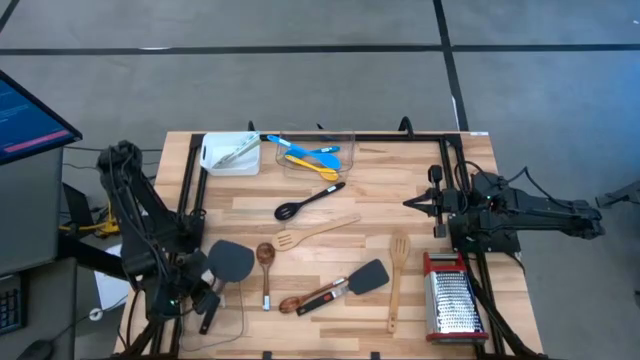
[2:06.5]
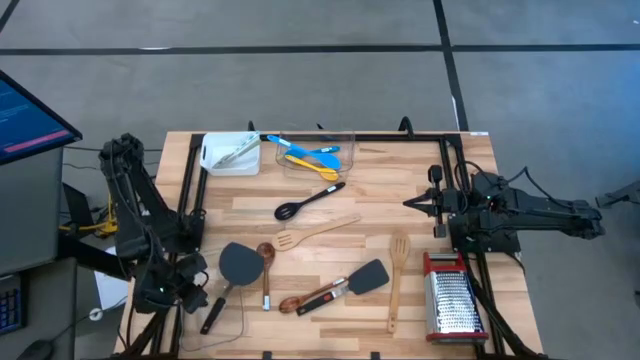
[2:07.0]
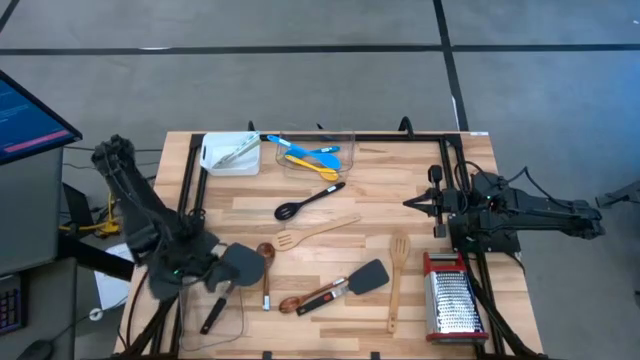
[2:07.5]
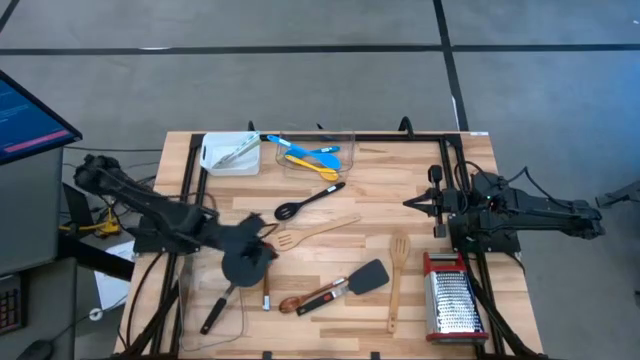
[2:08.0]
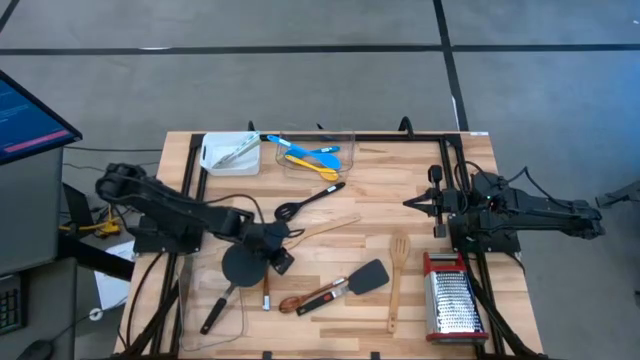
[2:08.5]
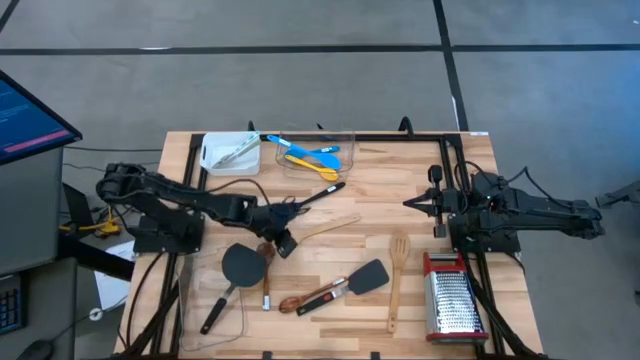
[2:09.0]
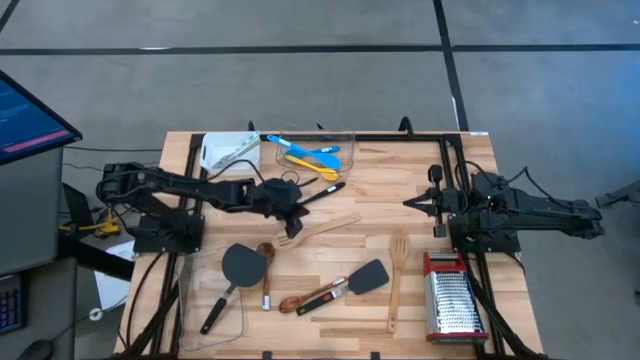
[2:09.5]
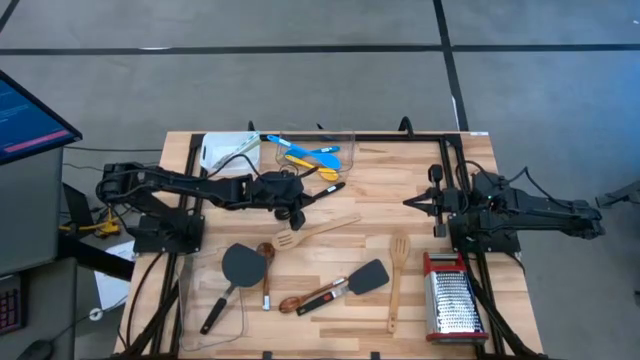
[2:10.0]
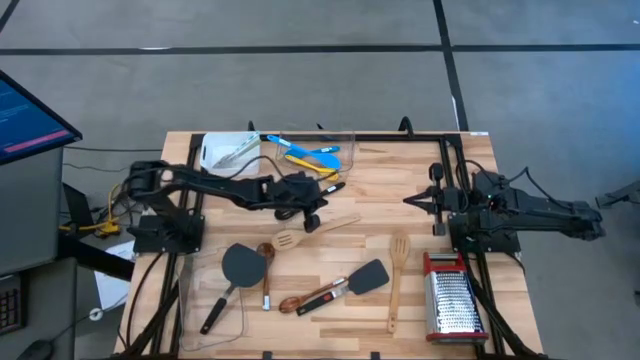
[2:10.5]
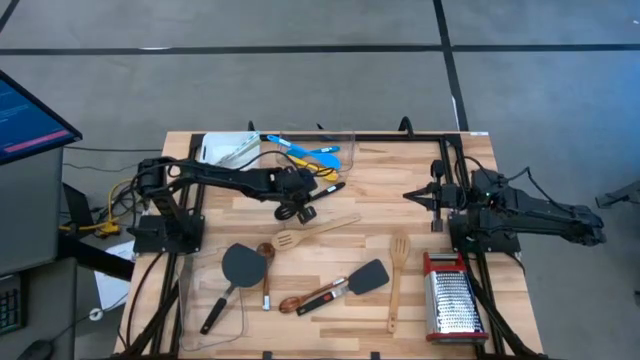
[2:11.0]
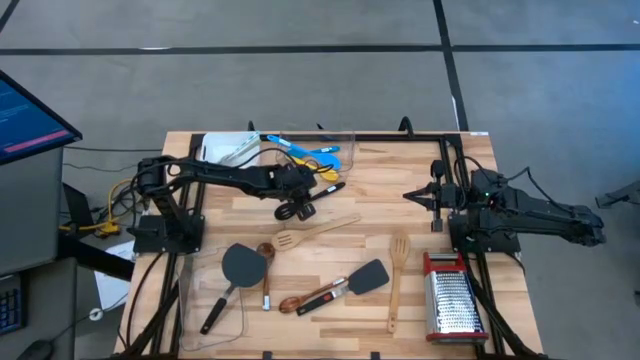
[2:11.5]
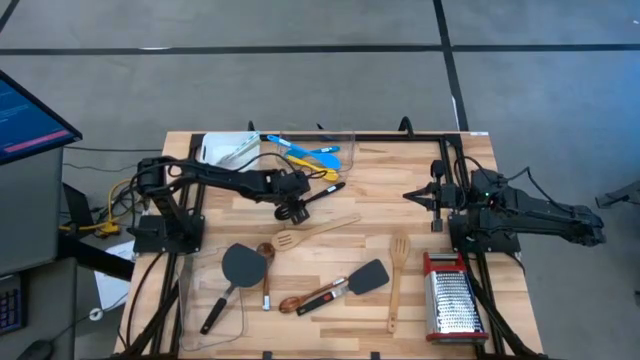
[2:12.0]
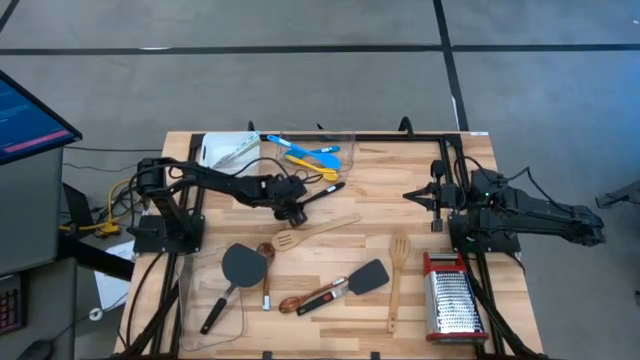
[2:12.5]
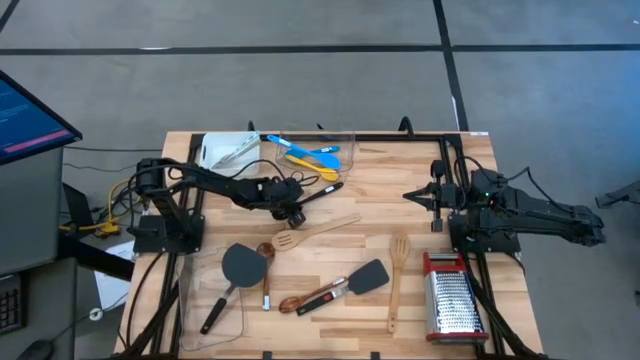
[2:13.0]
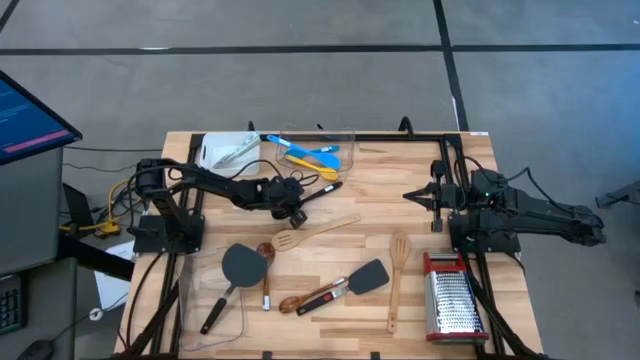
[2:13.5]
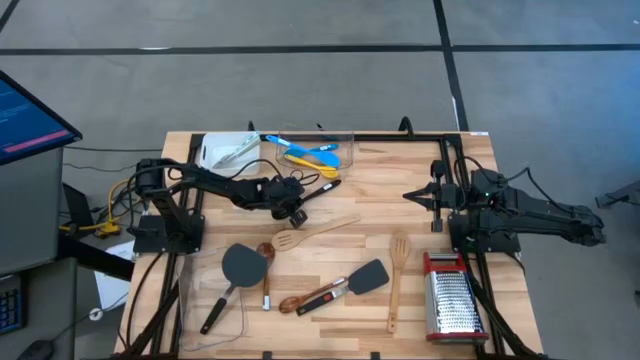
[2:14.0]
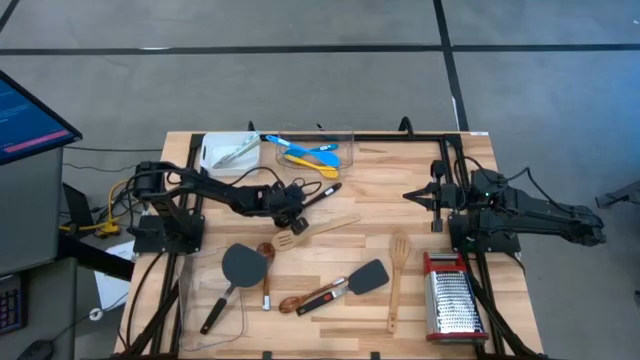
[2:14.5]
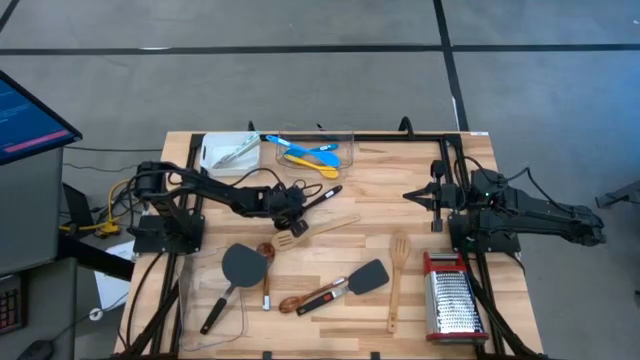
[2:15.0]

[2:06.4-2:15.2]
Task: Pick & Place Kitchen Items
Put the black serving spoon into the top transparent bin

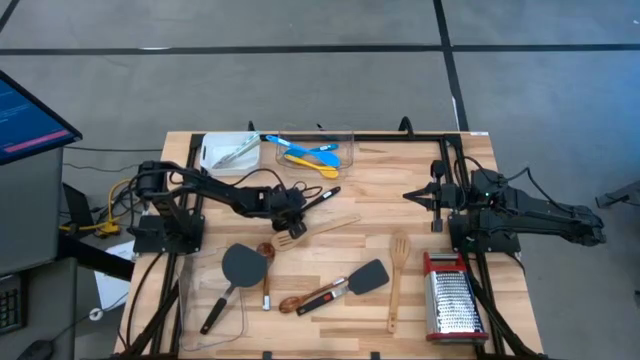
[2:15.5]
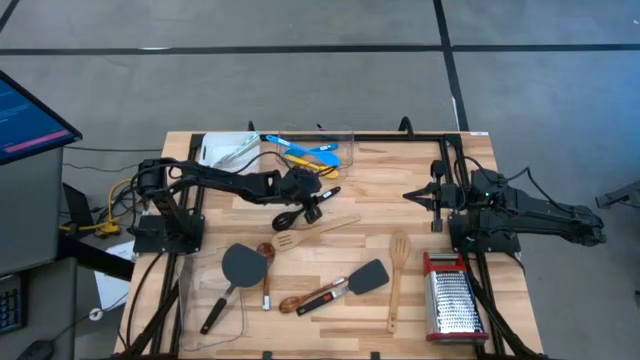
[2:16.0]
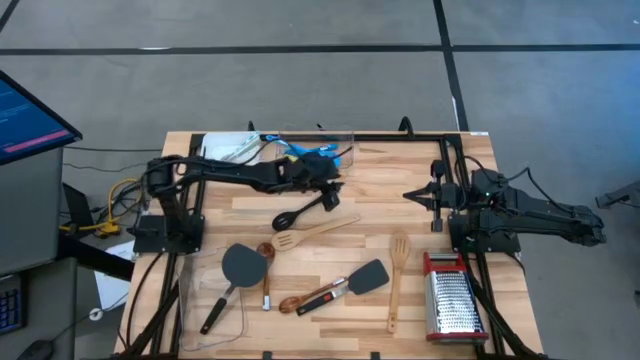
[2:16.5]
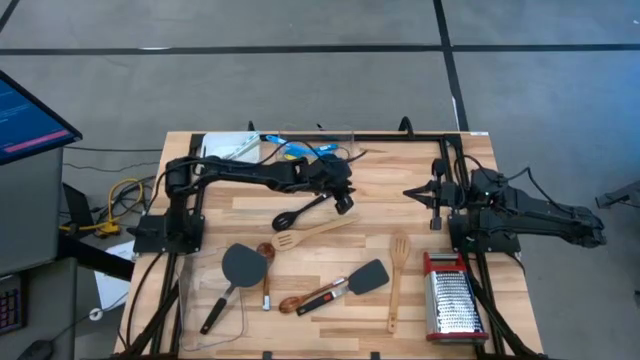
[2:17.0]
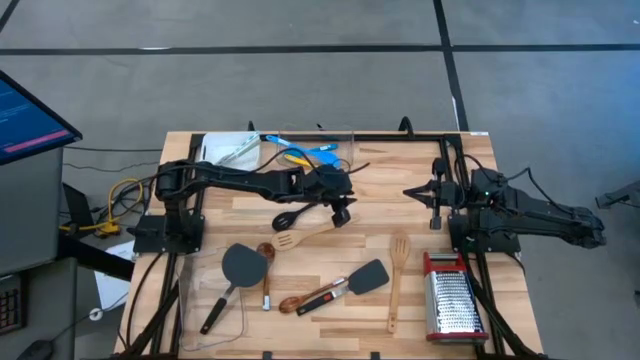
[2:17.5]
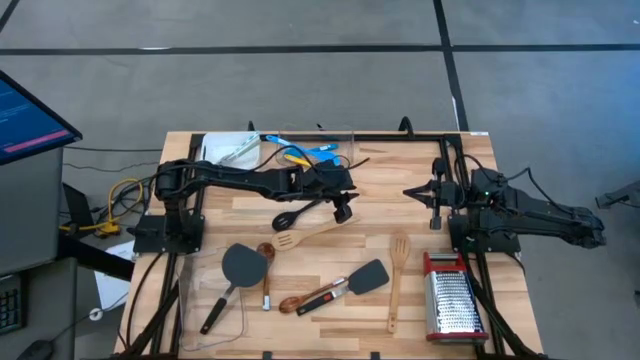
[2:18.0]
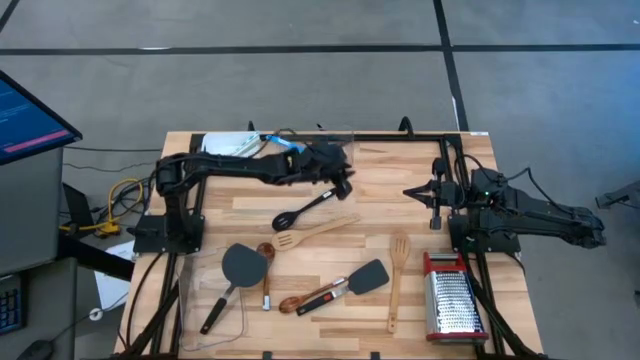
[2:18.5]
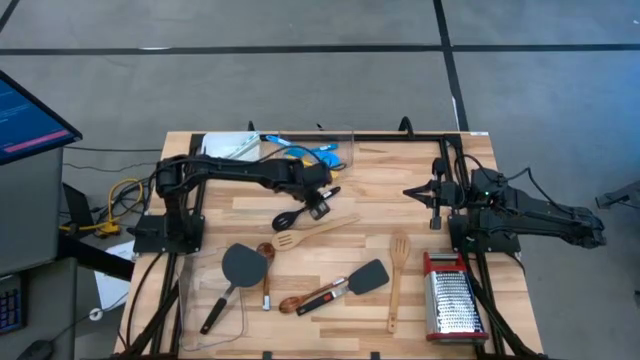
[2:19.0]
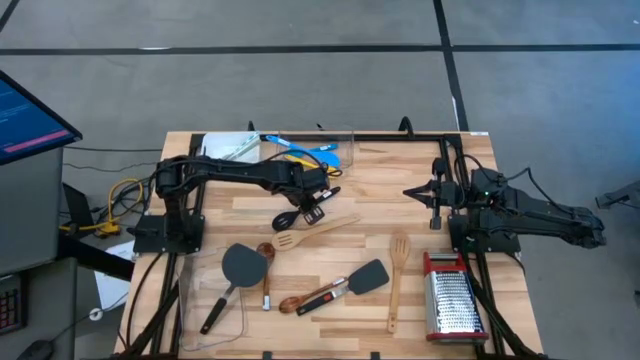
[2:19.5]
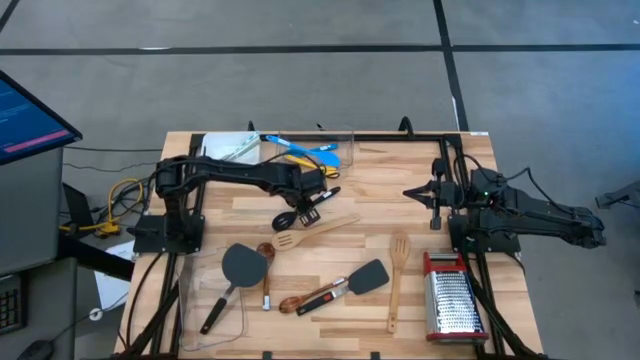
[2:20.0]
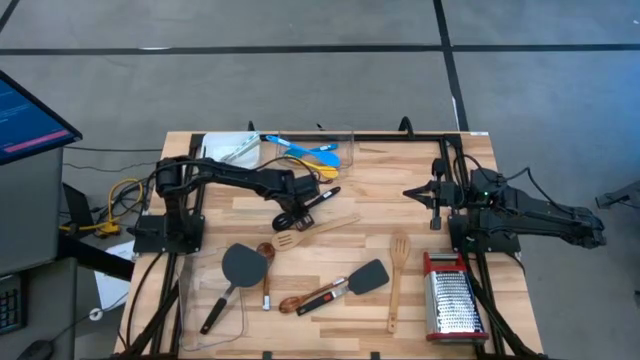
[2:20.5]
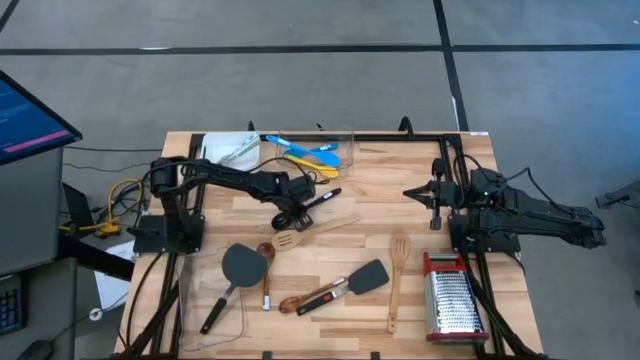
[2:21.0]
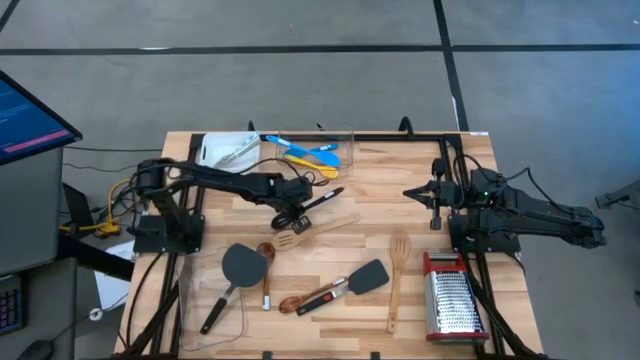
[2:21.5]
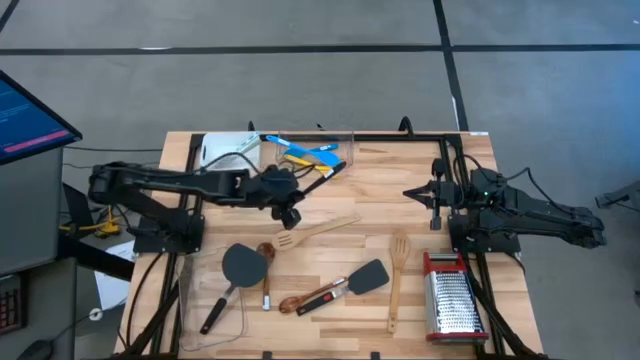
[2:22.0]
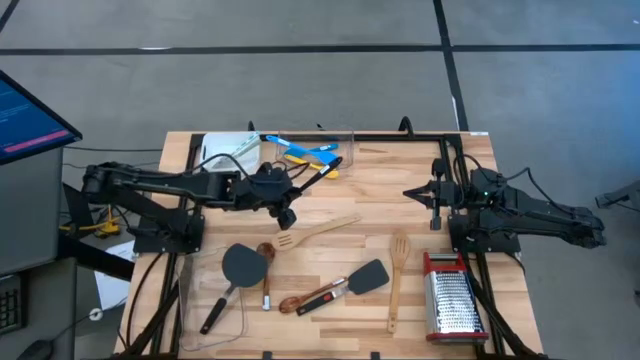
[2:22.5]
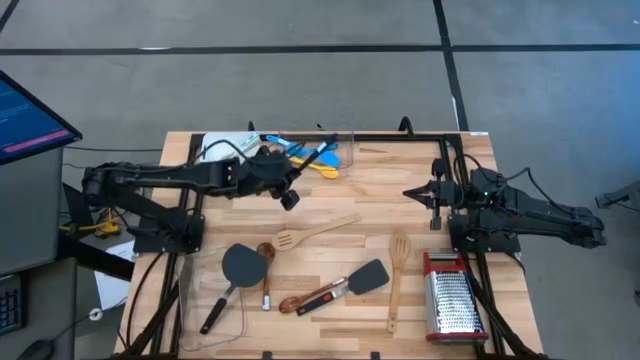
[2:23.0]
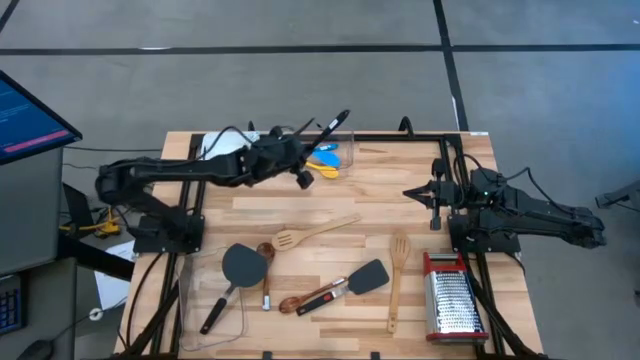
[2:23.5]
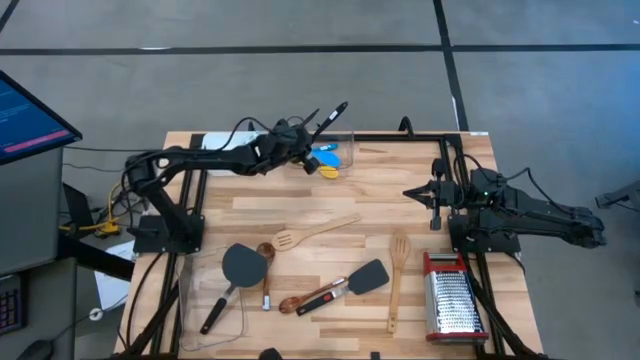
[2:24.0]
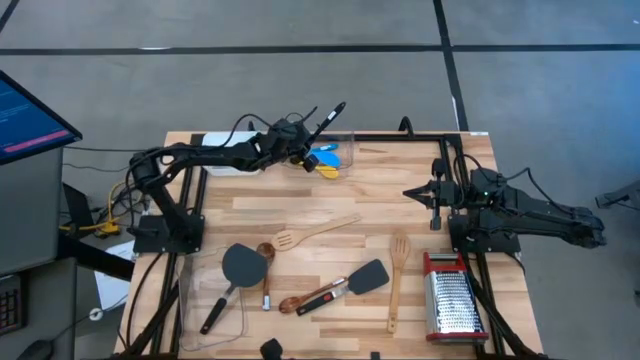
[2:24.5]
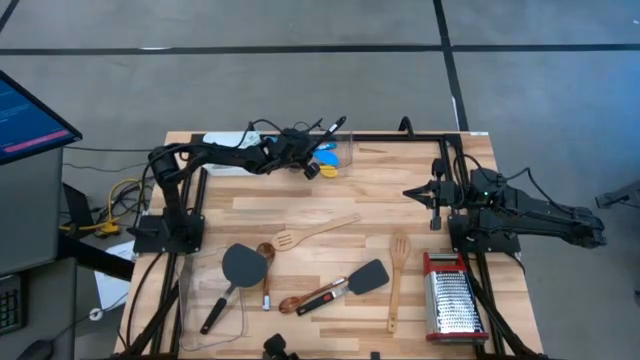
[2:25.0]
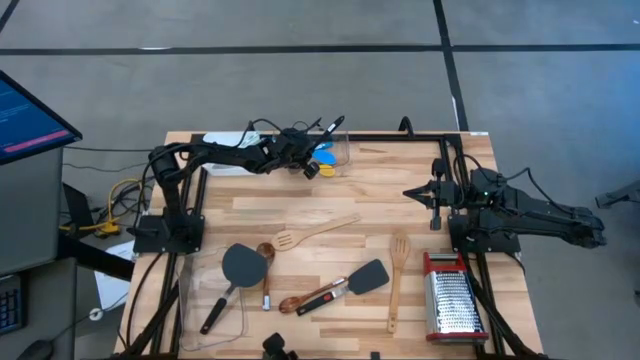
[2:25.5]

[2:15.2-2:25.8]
Put the black serving spoon into the top transparent bin

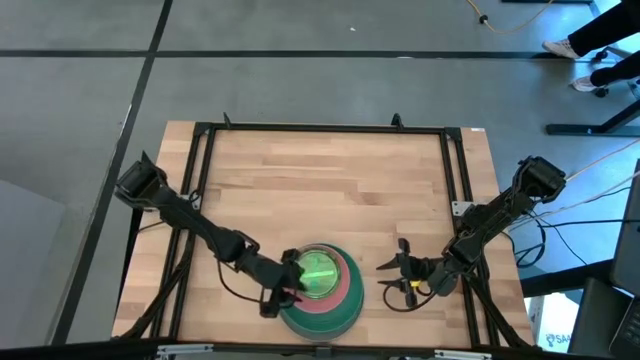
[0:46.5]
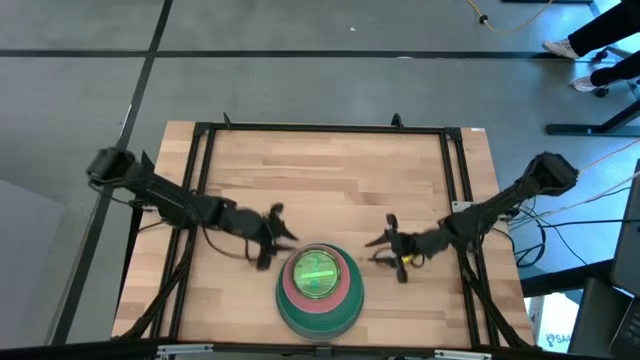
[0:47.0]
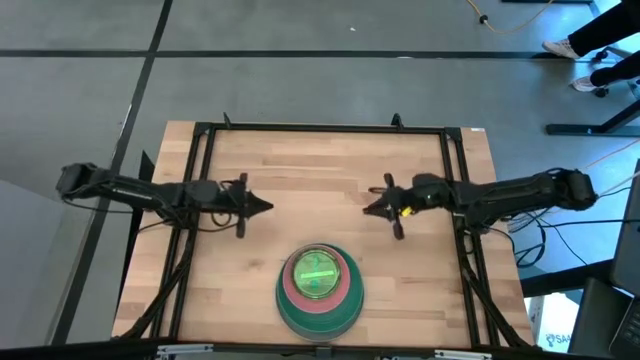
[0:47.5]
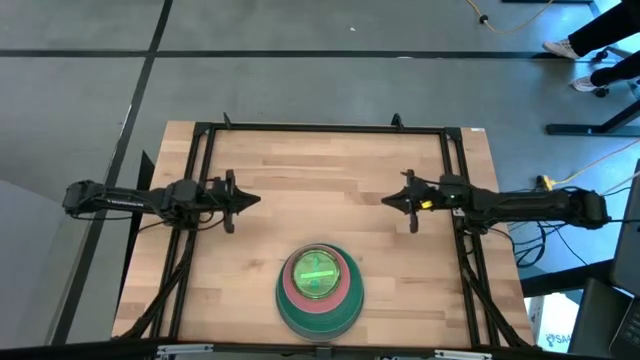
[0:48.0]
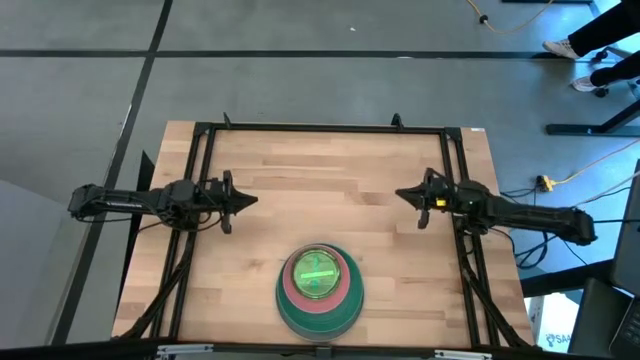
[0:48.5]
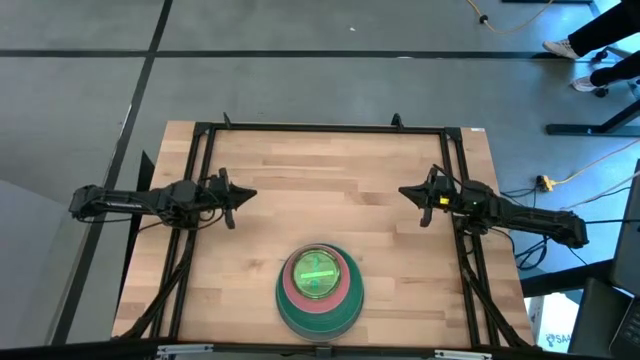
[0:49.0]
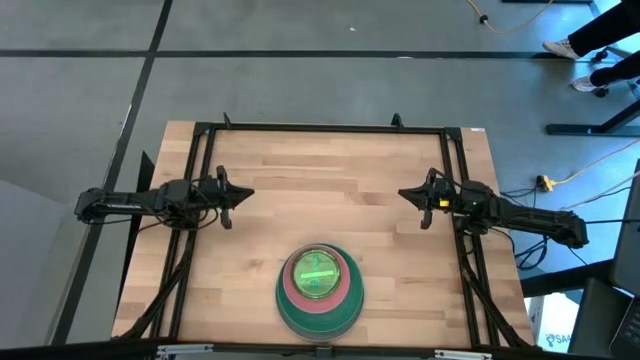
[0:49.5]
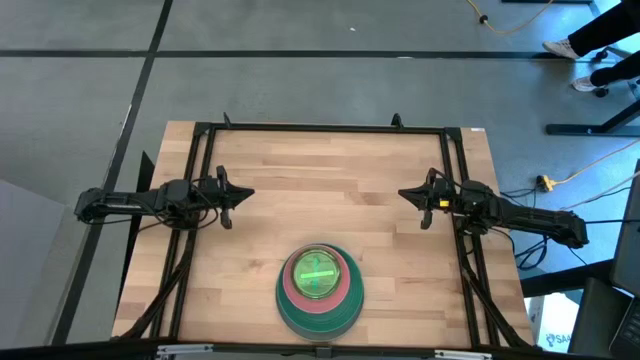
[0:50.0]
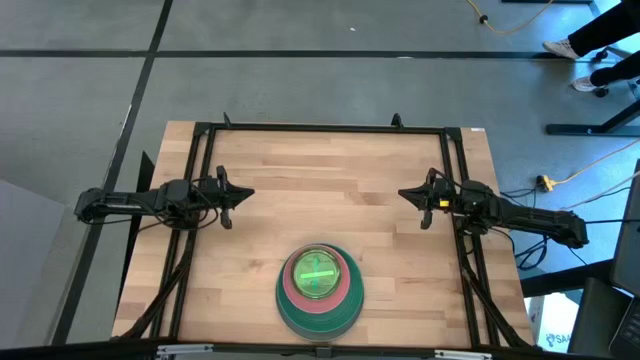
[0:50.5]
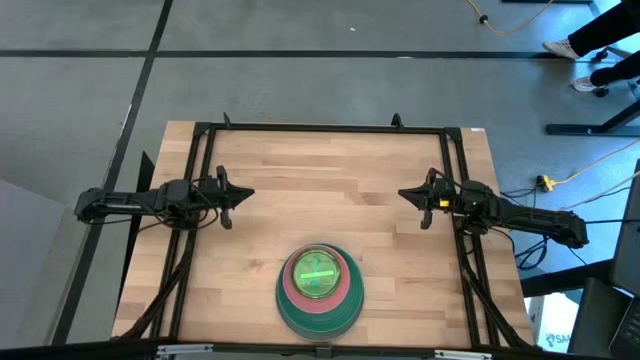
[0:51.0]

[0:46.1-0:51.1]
Task: Stack plastic plates
Return to Home Position
